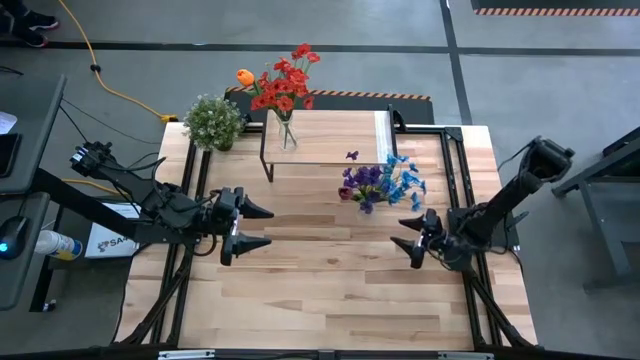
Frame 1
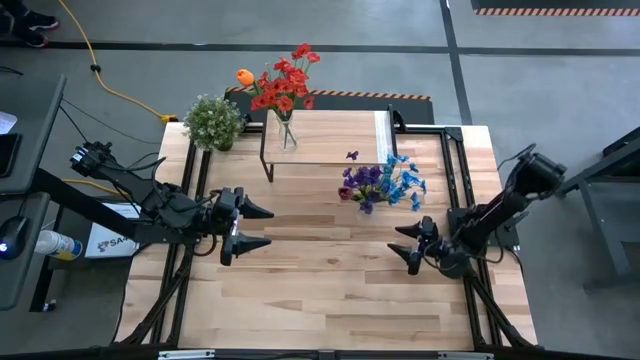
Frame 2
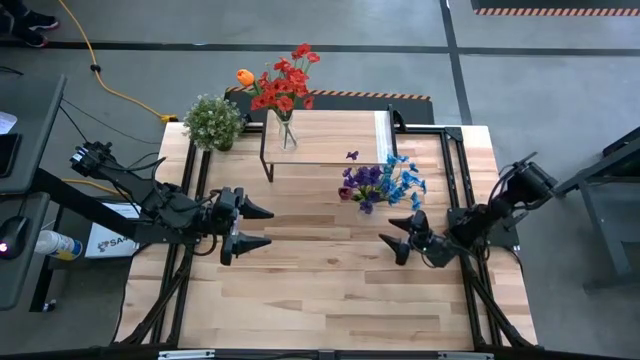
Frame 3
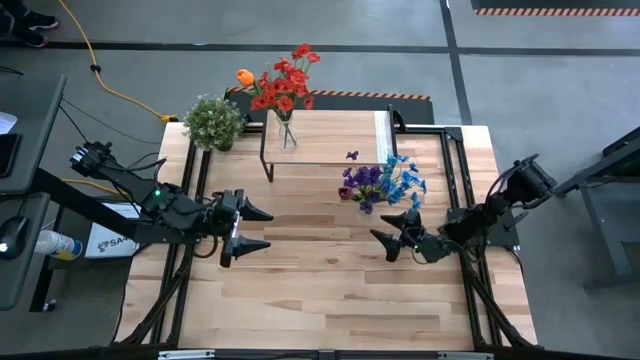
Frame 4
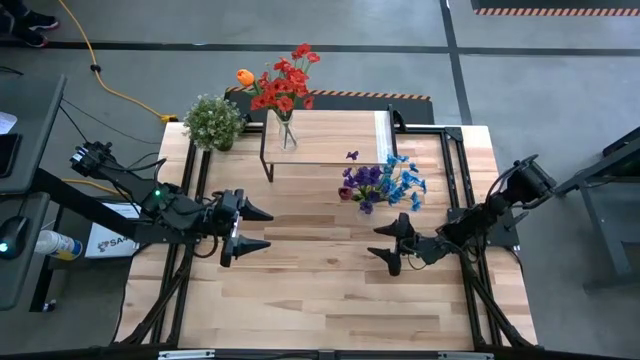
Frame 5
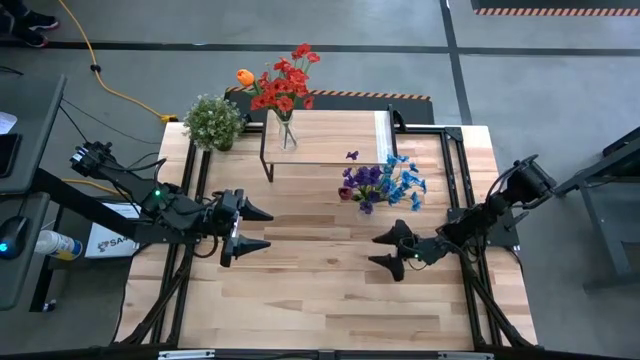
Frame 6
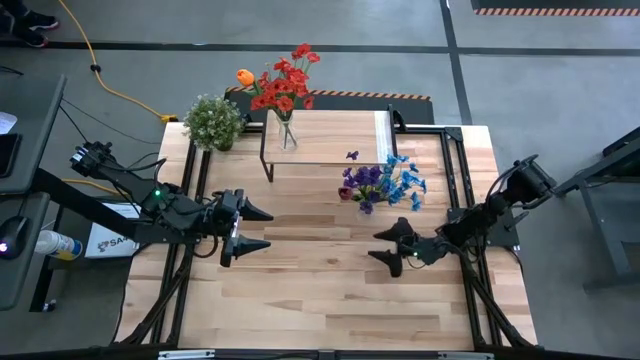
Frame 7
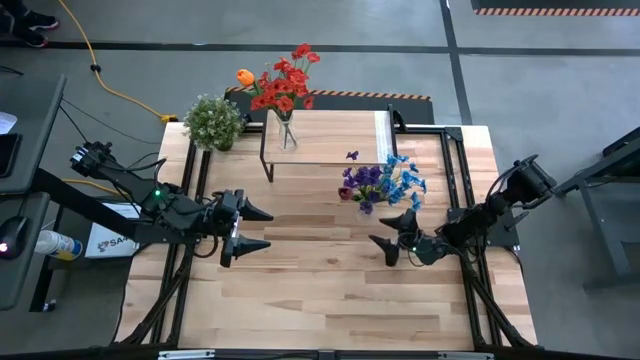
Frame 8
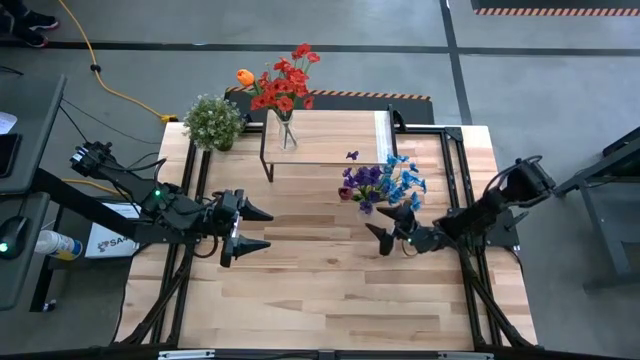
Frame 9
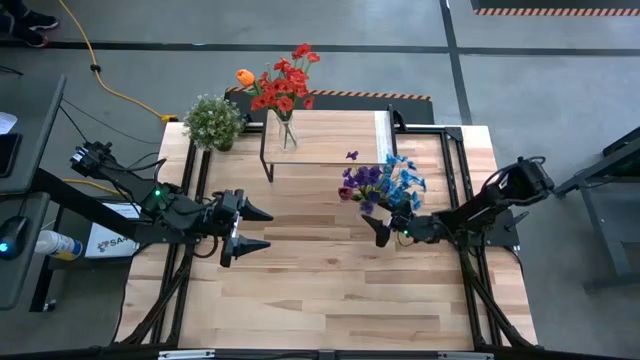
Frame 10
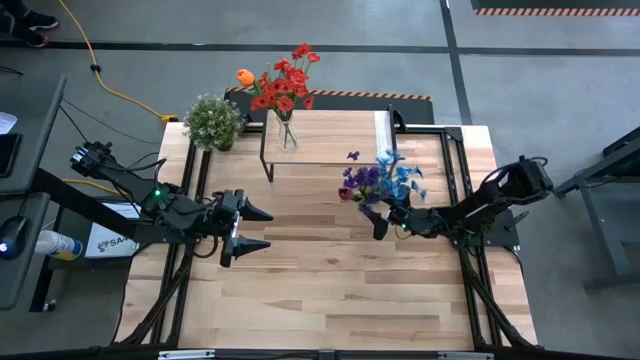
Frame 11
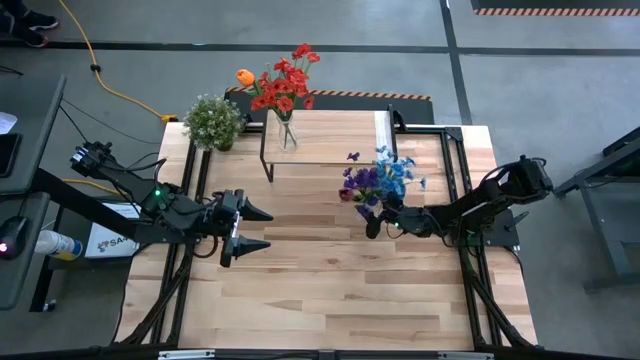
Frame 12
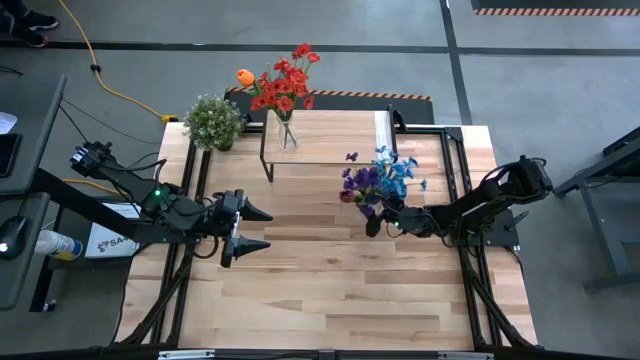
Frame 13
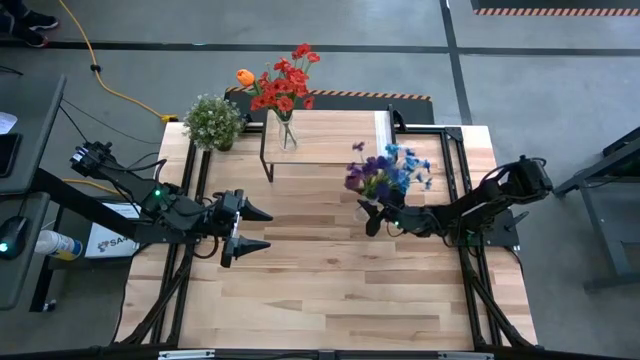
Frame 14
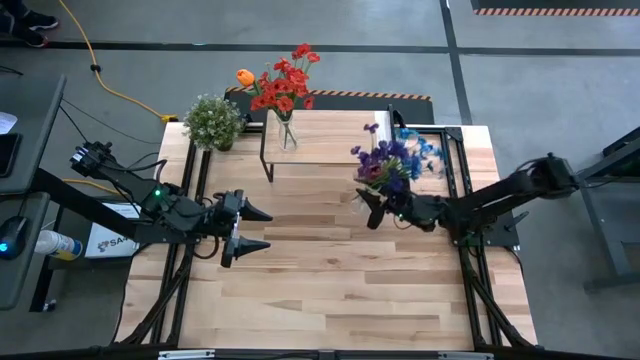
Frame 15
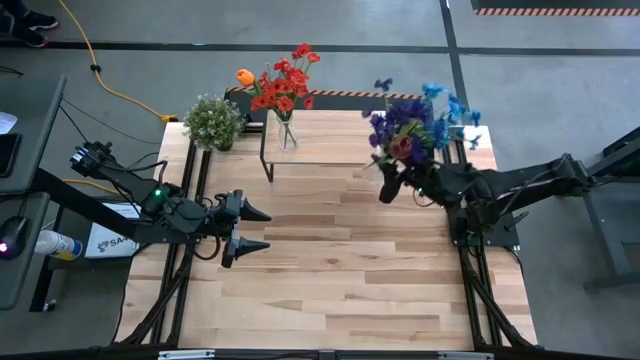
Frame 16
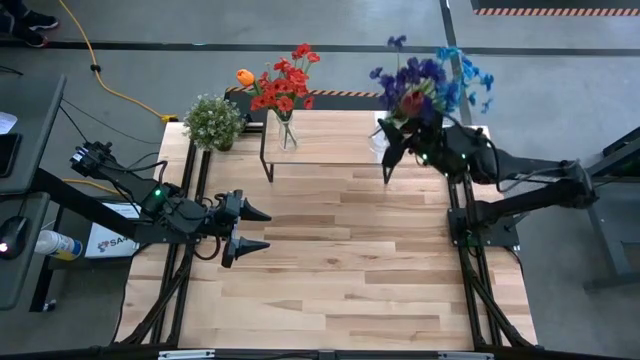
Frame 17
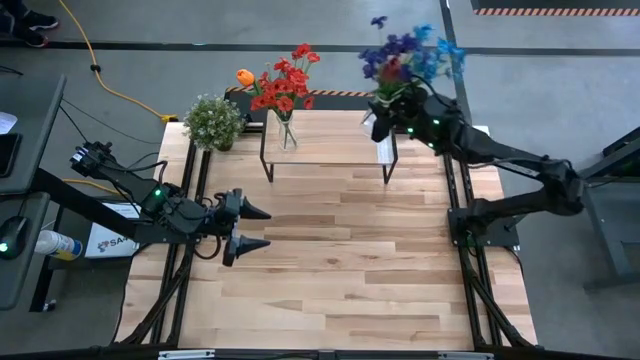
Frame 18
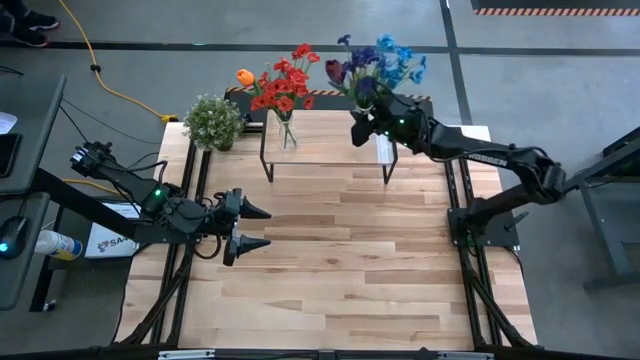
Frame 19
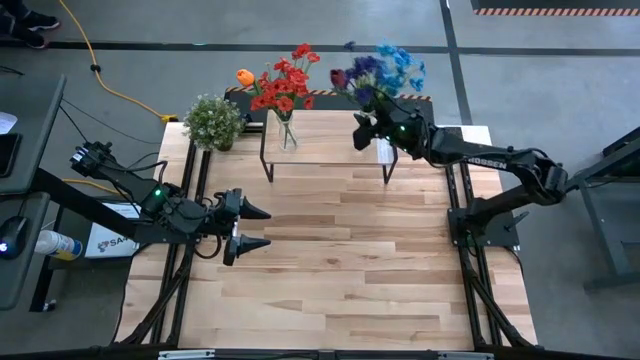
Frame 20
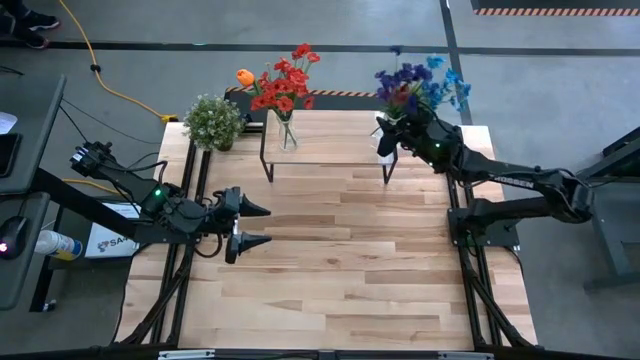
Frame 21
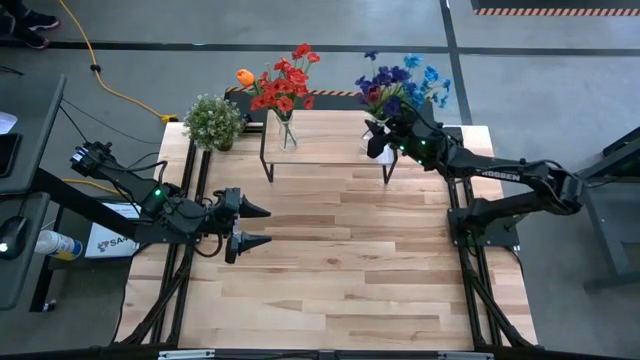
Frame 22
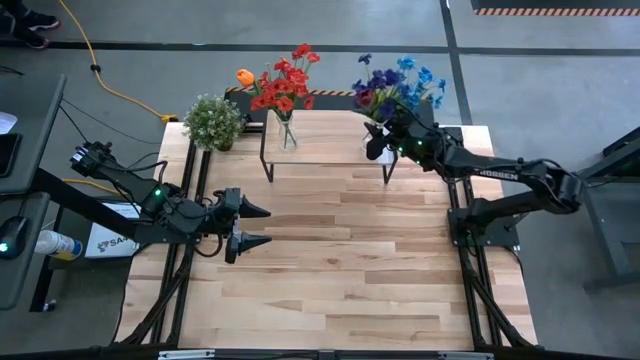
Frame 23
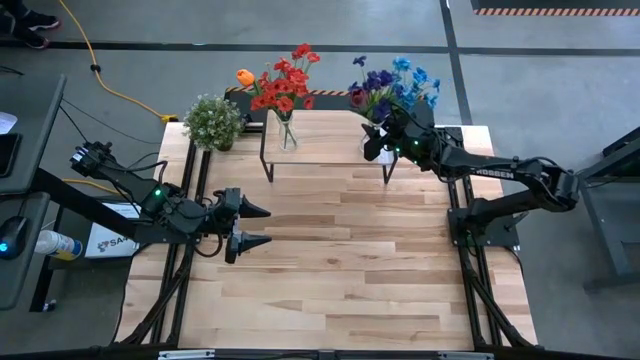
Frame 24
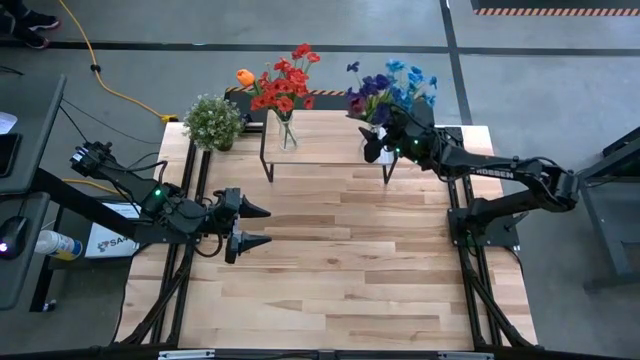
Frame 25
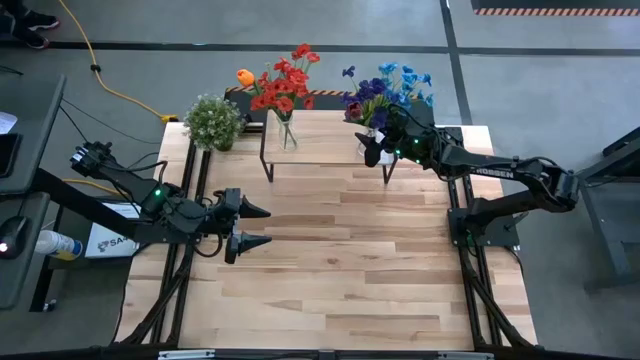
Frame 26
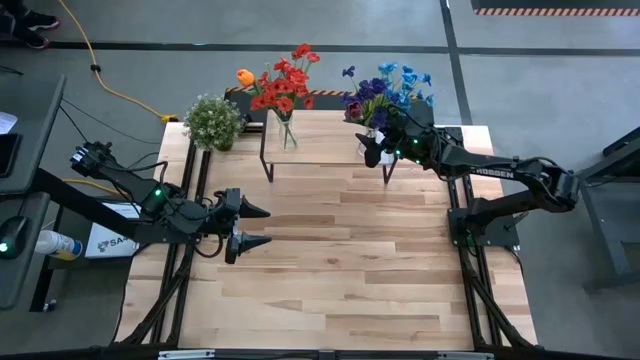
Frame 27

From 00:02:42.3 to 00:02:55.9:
Task: Pick and place flowers into a vace then onto a shelf
Put the transparent vase with flowers on the shelf

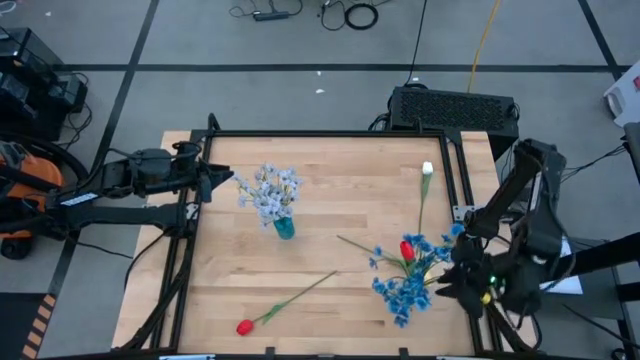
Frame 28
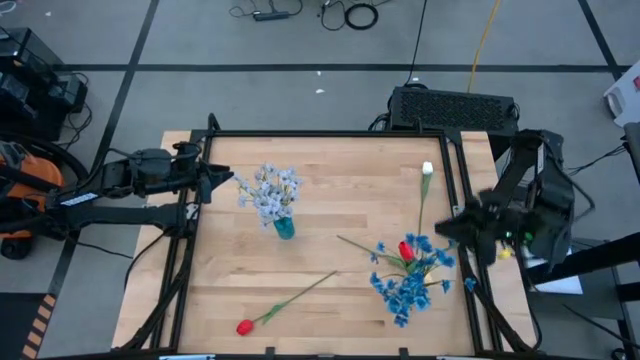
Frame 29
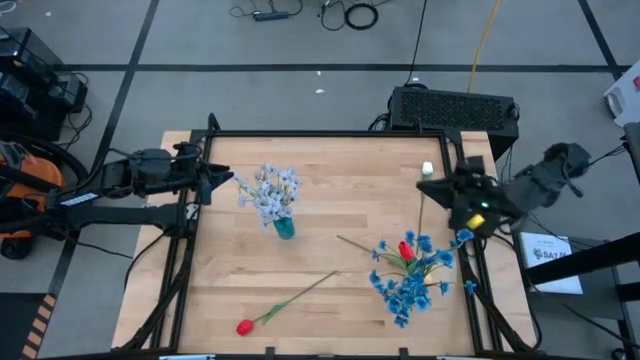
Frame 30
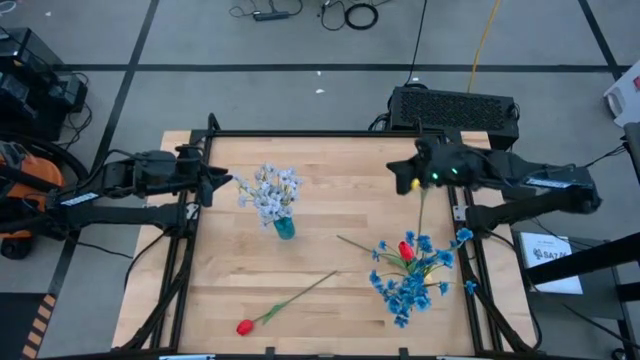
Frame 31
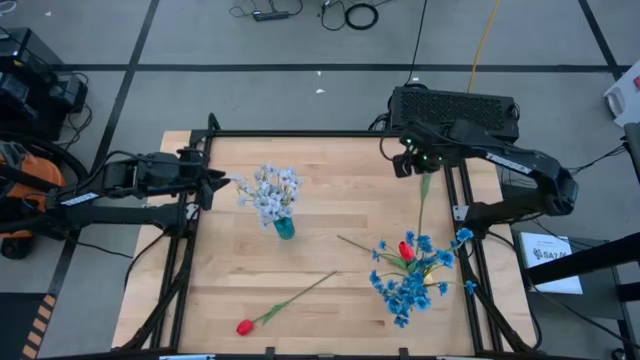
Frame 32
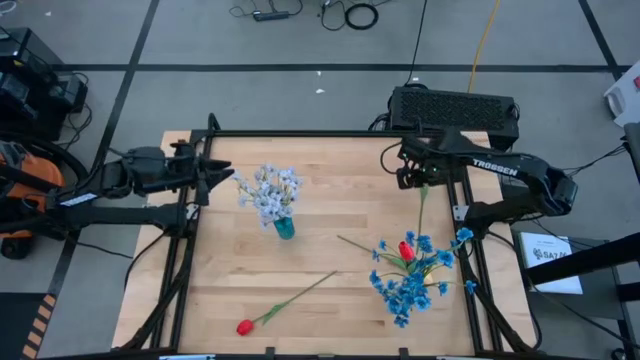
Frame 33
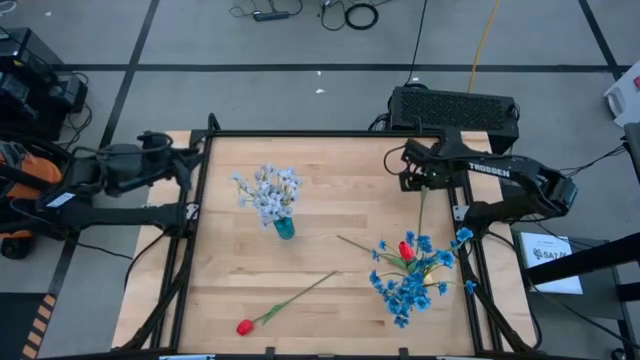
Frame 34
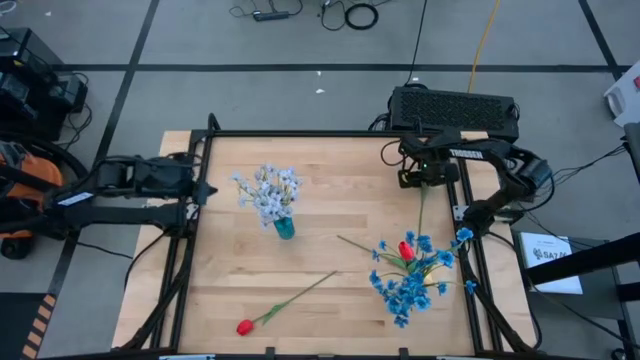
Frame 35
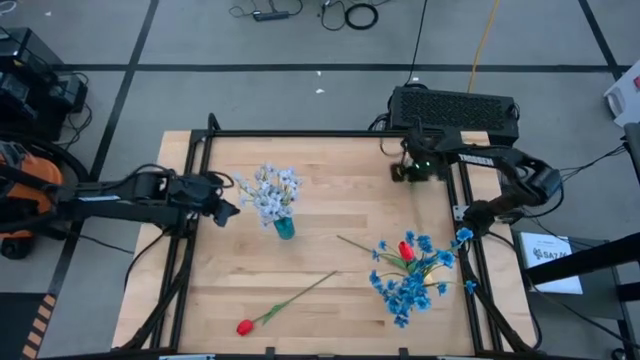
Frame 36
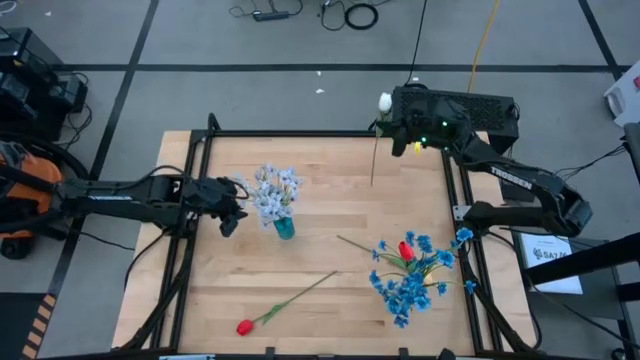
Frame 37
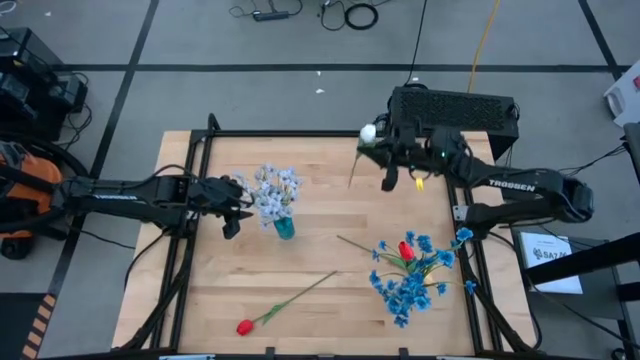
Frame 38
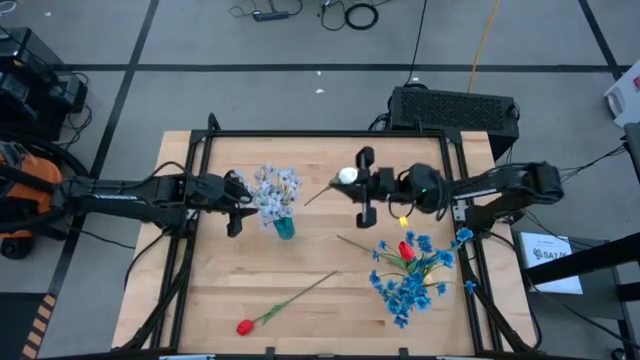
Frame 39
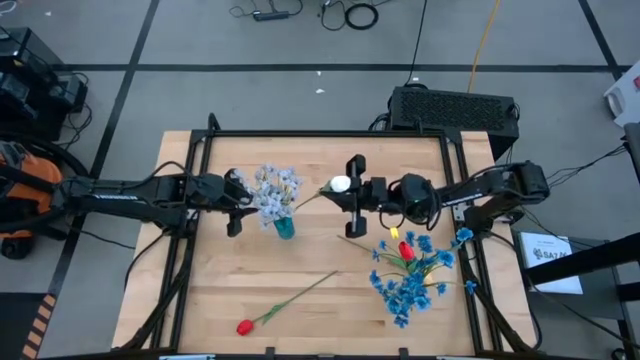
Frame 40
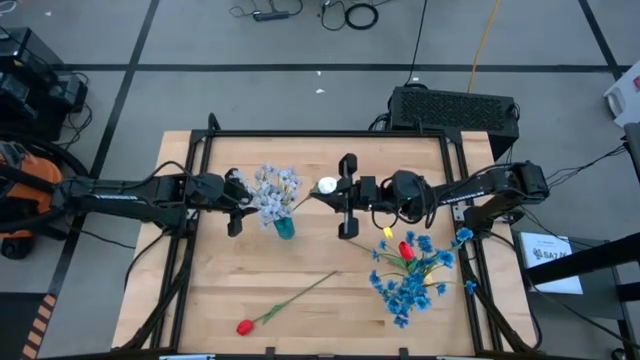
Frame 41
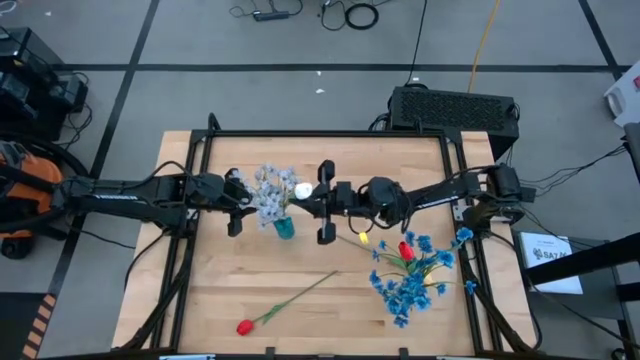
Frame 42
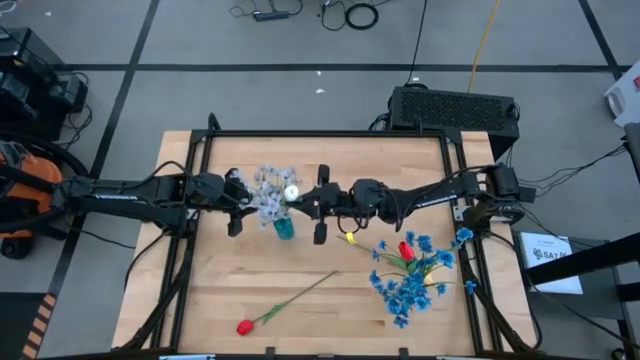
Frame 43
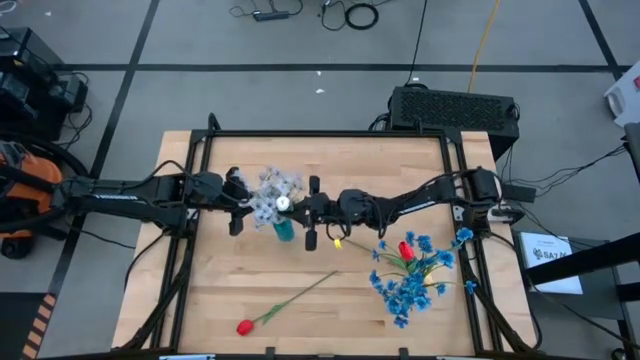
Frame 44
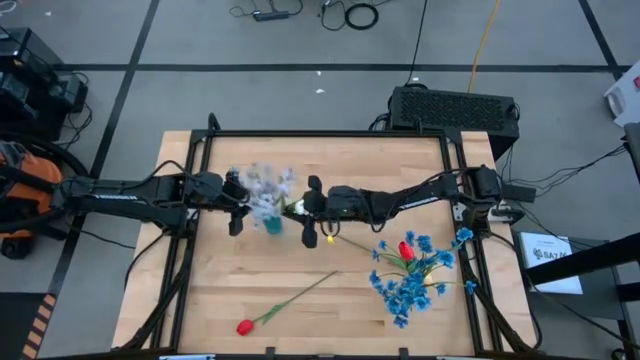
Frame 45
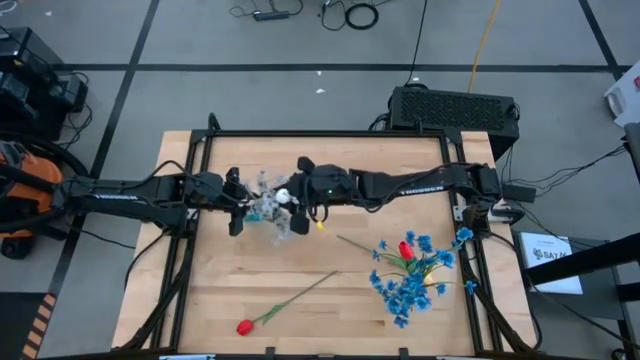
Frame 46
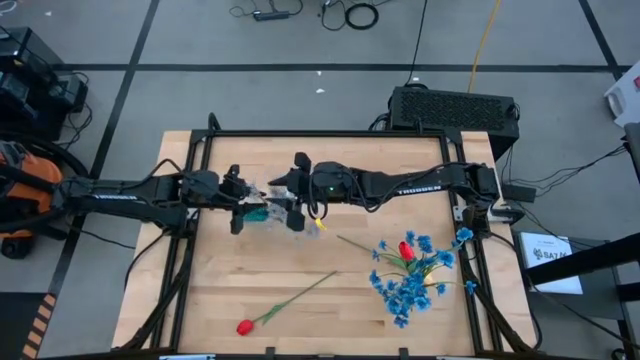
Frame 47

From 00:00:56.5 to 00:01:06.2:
Task: Sort flowers into vase by color
Put the white tulip into the blue transparent vase
